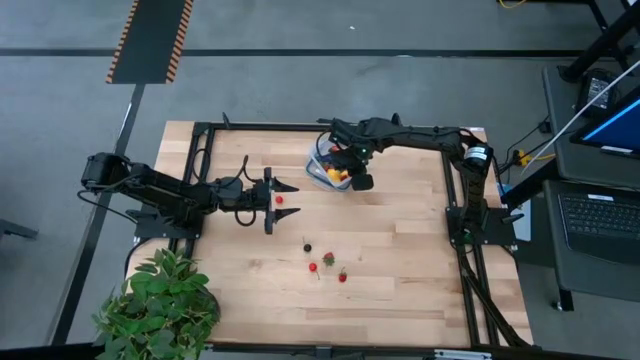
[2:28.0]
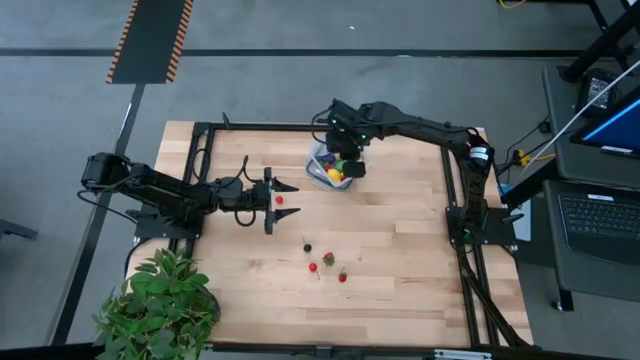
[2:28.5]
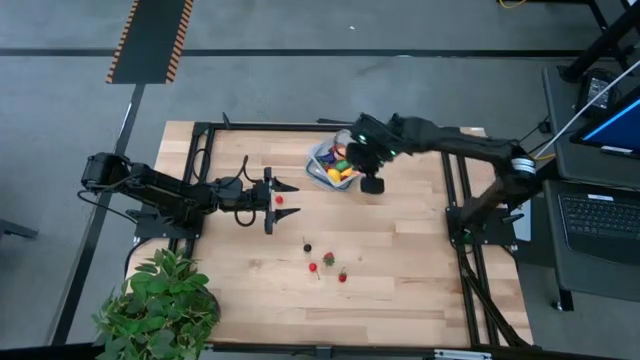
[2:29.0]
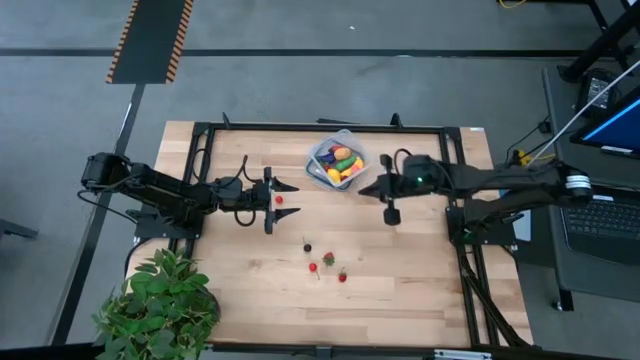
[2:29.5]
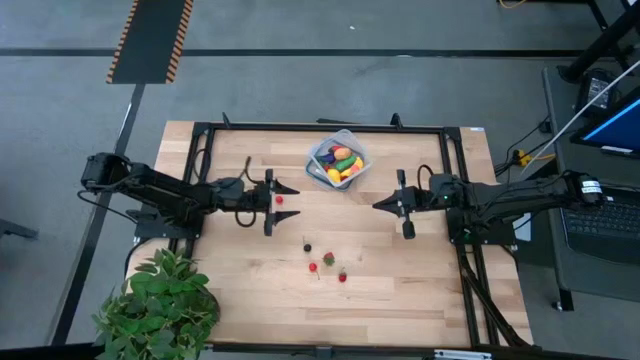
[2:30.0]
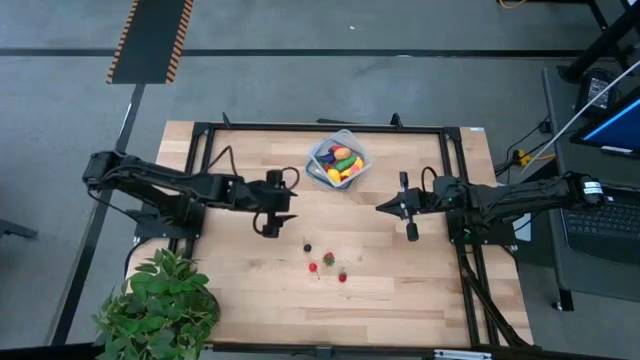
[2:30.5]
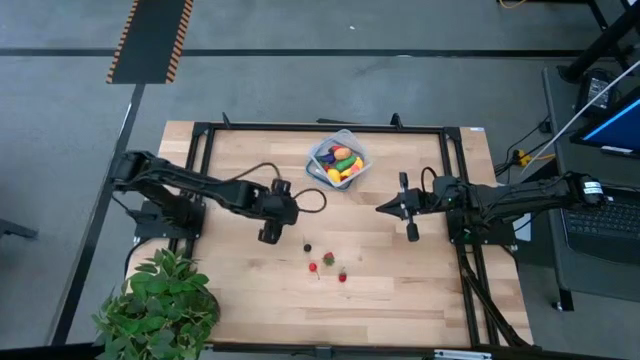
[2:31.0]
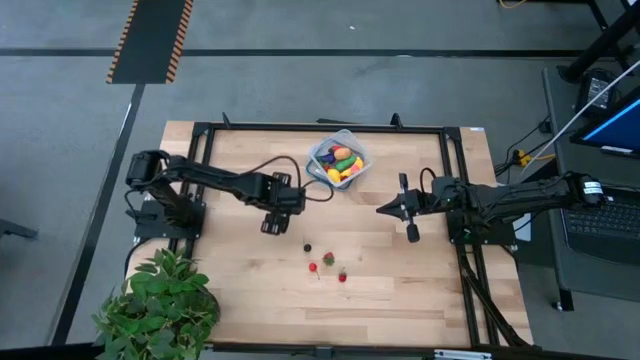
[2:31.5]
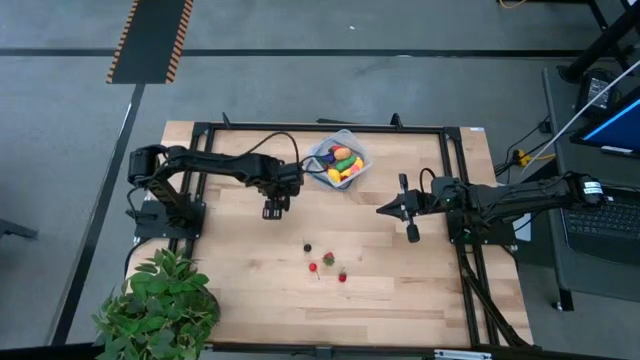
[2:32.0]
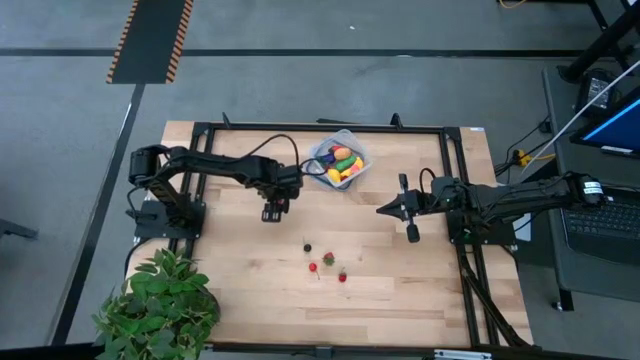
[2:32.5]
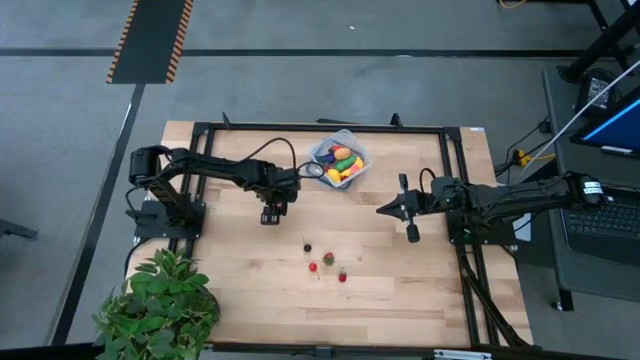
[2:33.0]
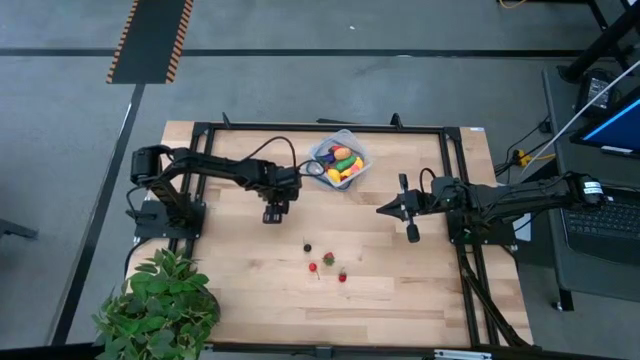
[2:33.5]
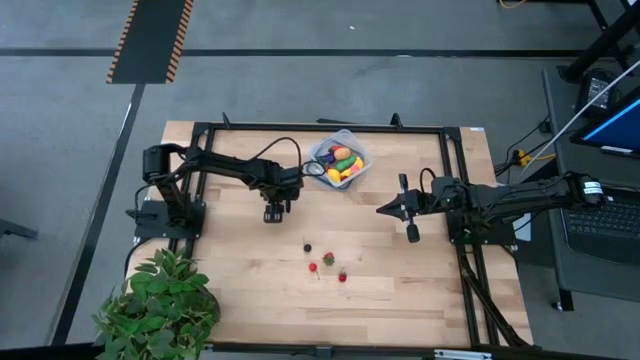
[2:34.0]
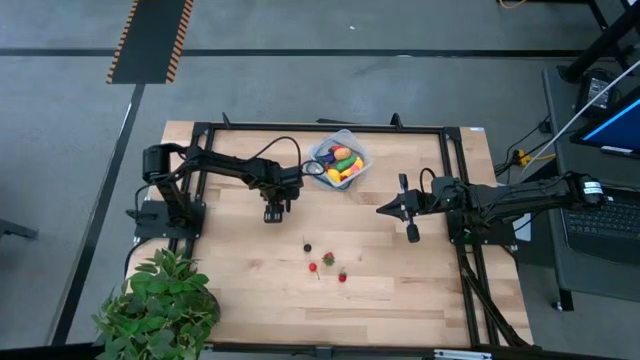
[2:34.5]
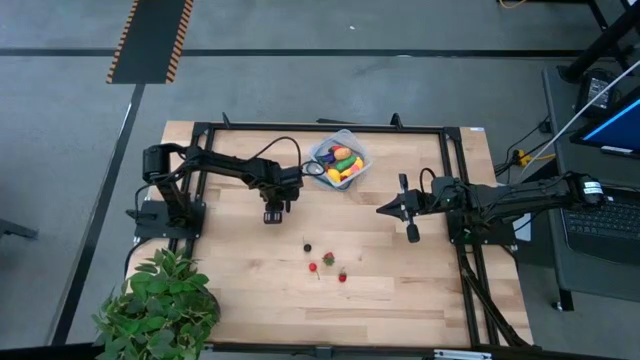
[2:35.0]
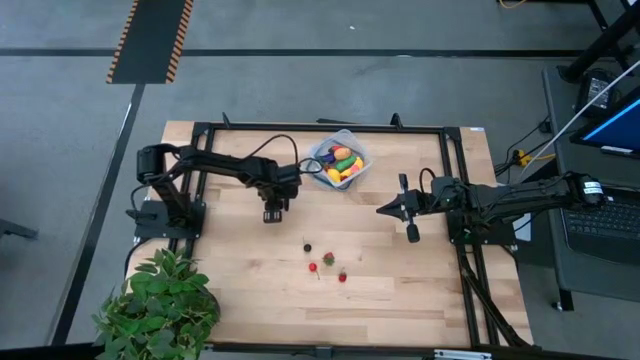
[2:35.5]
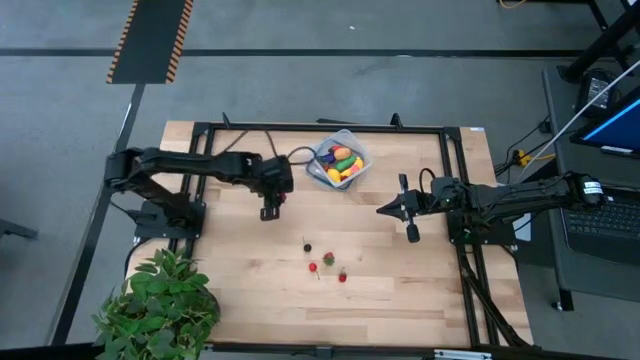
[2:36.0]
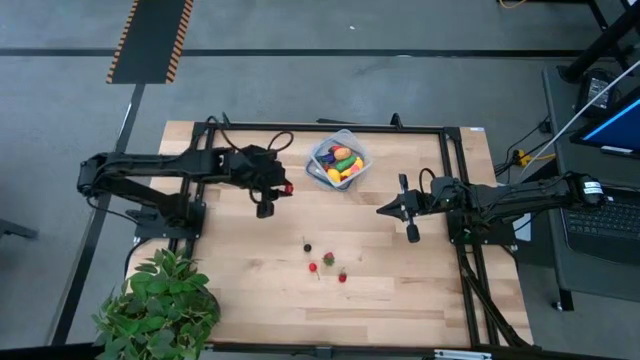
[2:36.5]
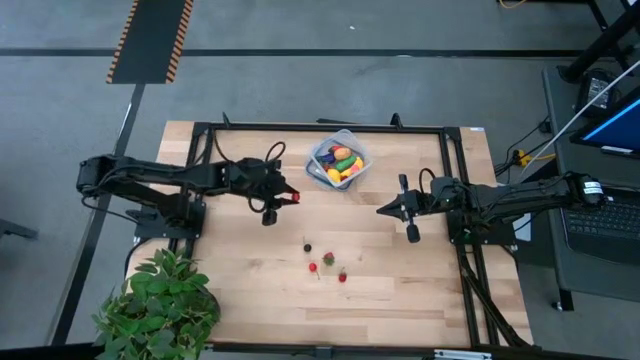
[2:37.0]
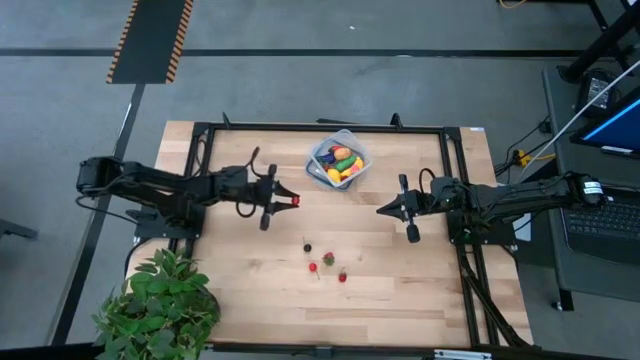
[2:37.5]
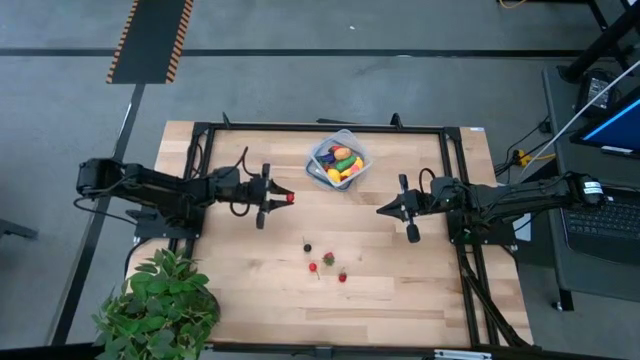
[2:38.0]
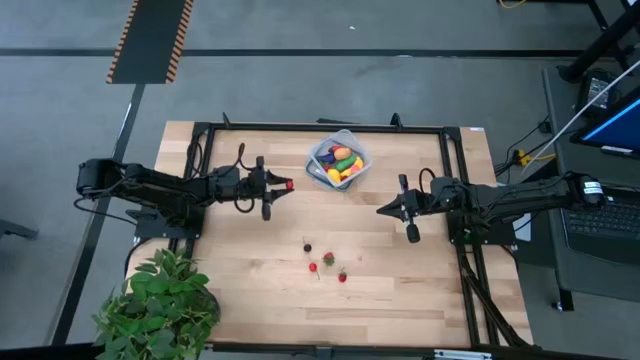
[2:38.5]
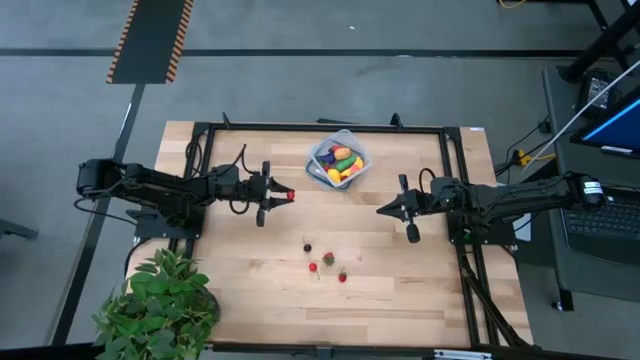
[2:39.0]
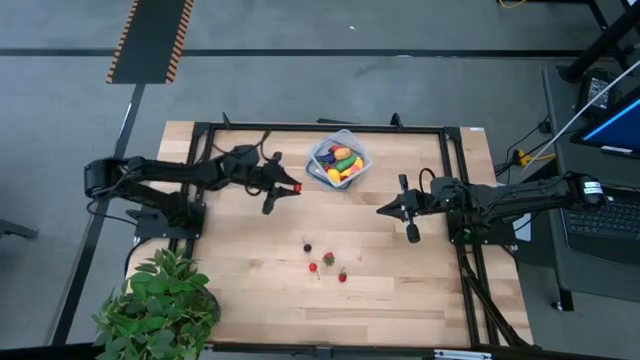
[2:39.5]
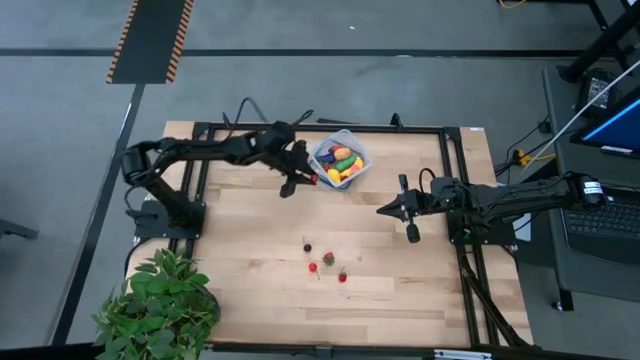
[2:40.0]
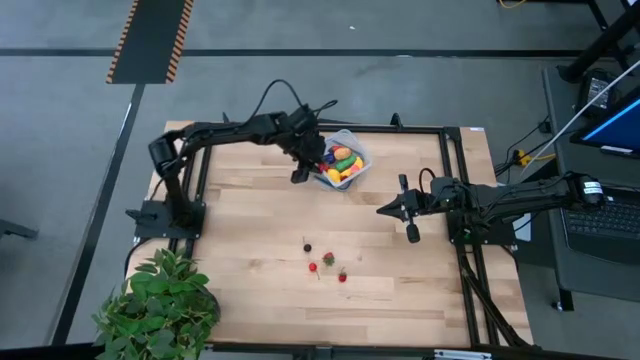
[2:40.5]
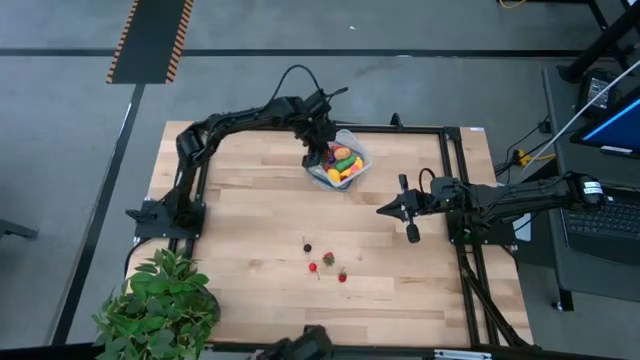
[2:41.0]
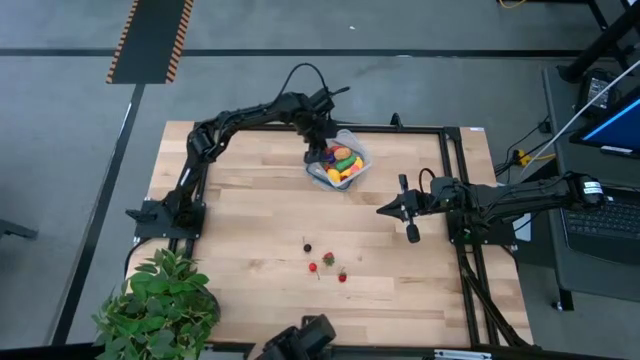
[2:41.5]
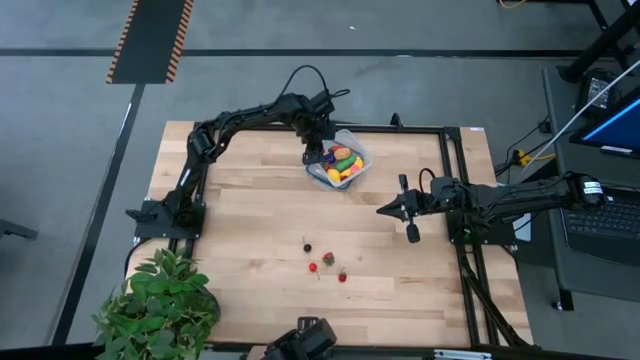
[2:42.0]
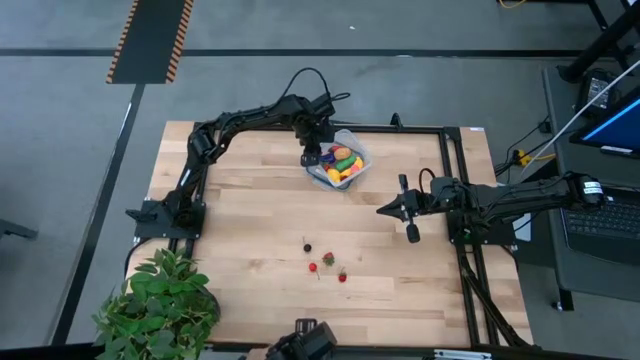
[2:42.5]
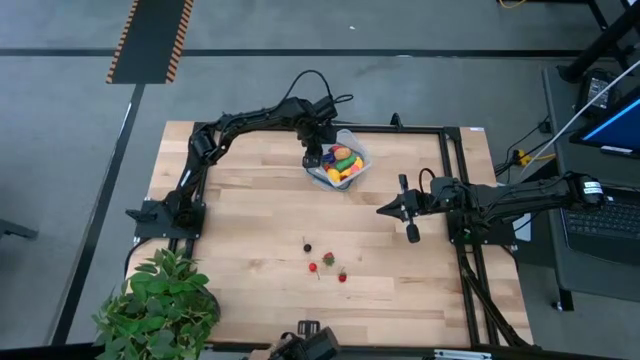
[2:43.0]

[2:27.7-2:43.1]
Task: Pick and placing Produce into tupperware
Put the top red cherry into the transparent container

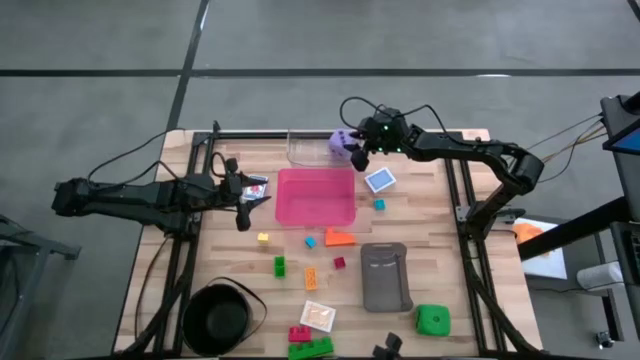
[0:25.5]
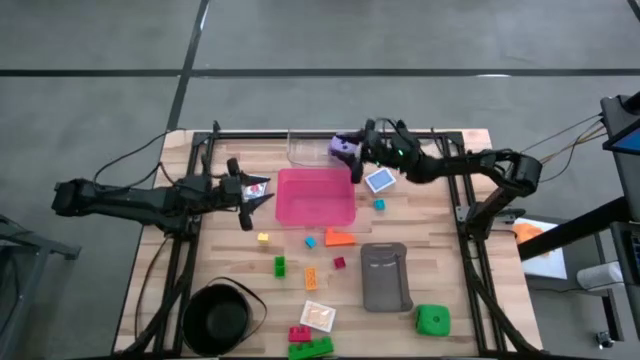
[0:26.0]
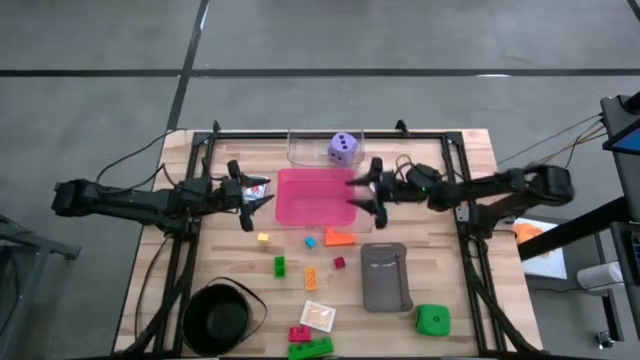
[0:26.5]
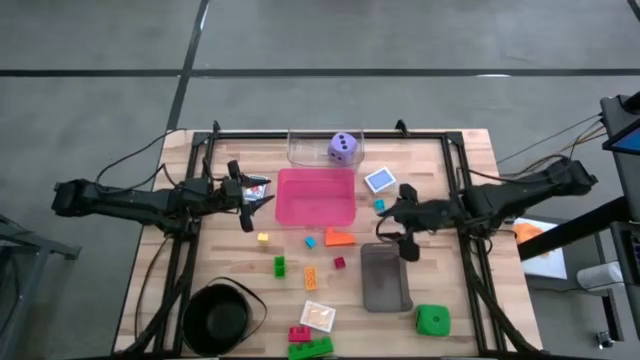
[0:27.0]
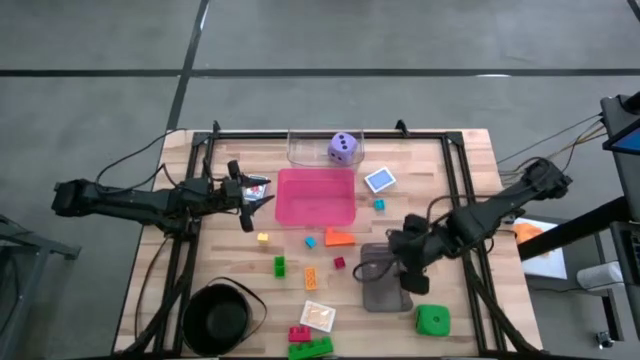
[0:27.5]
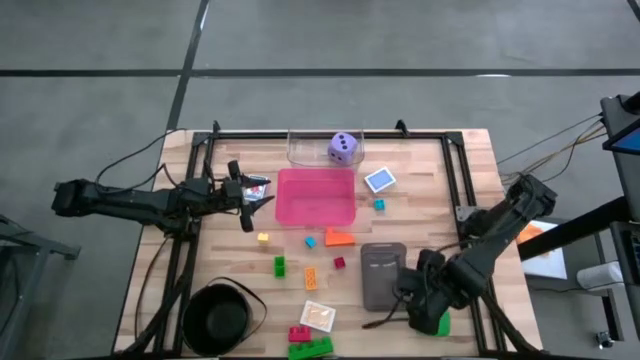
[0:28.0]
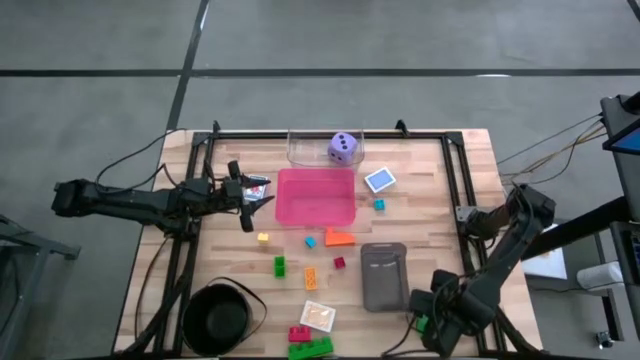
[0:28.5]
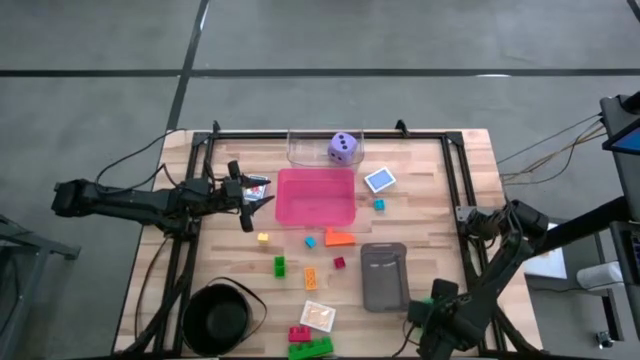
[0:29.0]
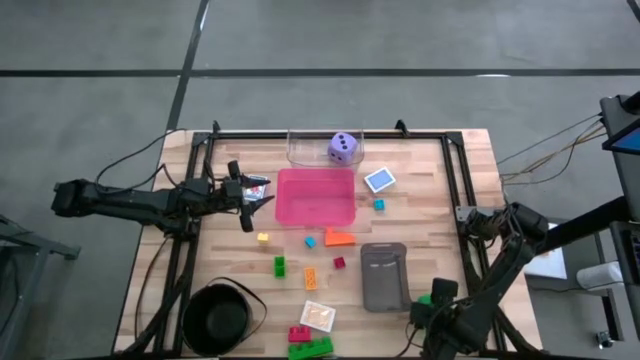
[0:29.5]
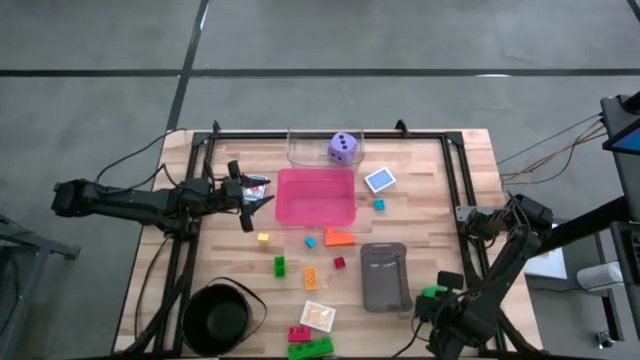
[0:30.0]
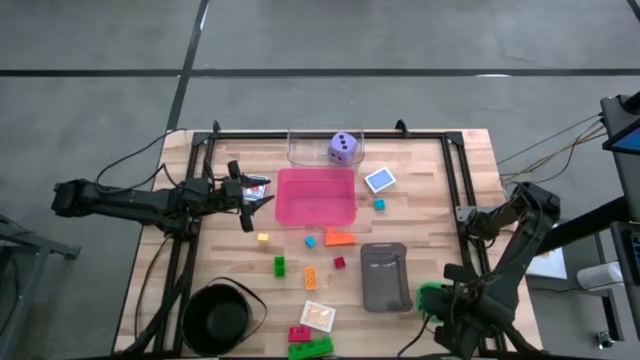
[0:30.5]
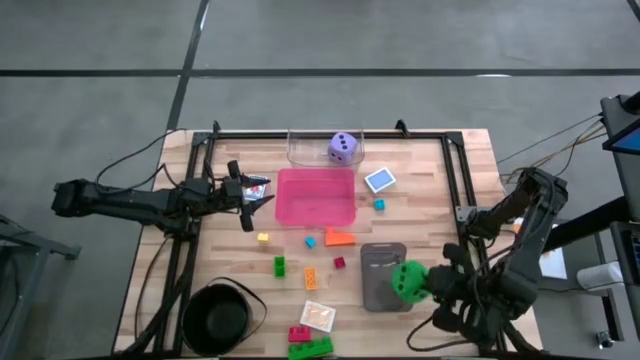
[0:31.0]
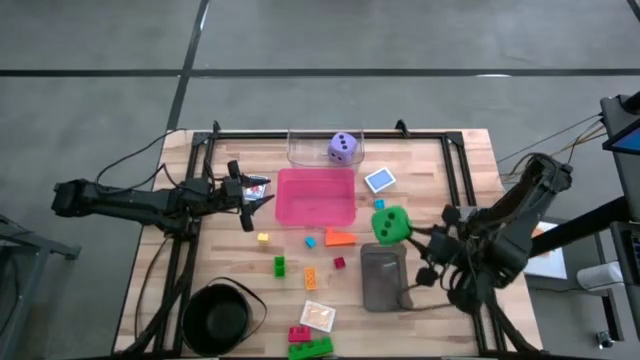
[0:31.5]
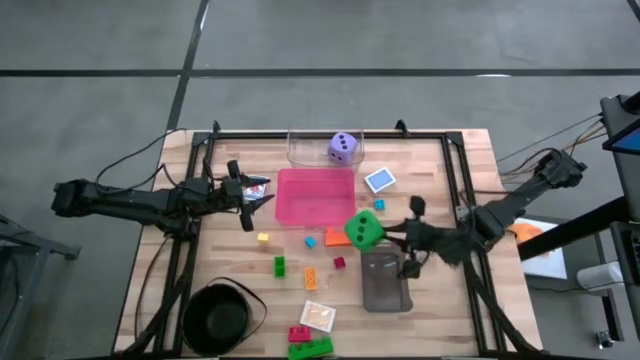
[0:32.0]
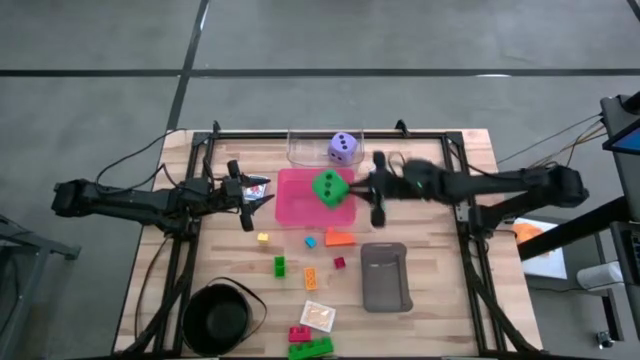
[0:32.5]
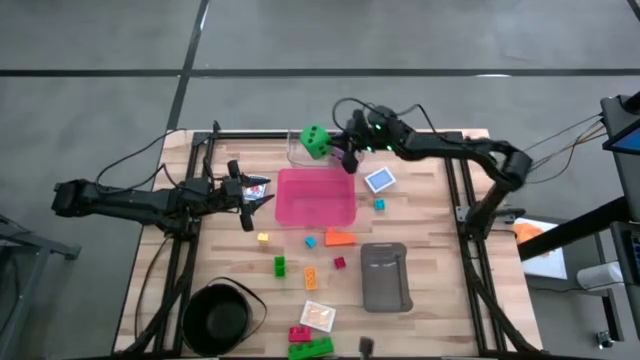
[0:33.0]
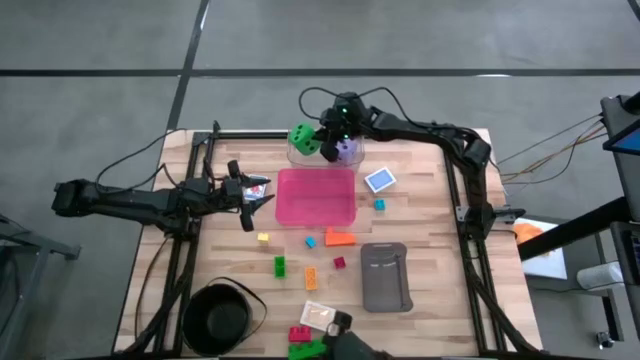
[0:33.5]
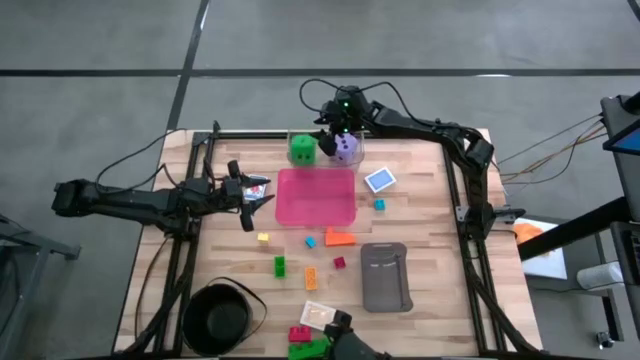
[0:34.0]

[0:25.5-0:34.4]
Task: Pick & Place Toys
Put the green dice into the transparent bin
